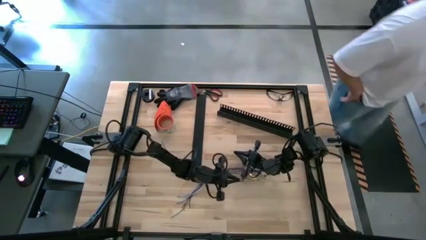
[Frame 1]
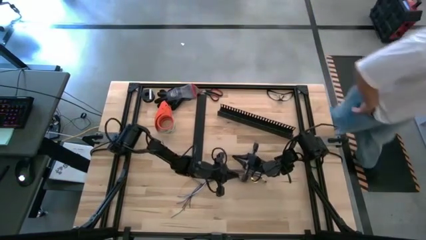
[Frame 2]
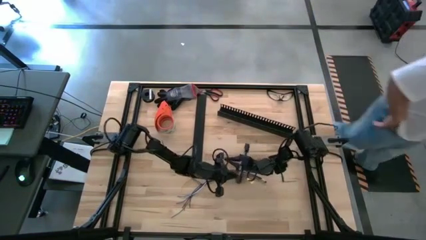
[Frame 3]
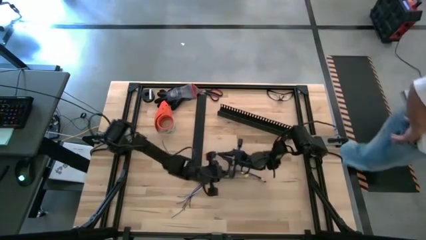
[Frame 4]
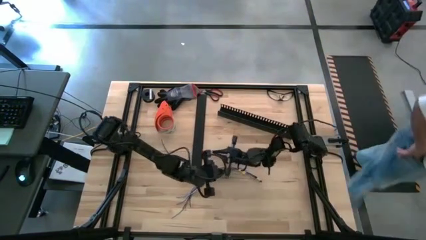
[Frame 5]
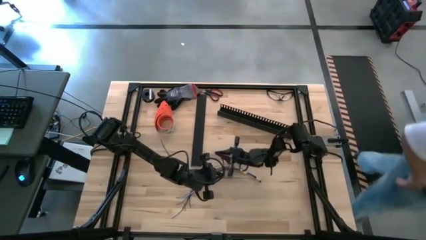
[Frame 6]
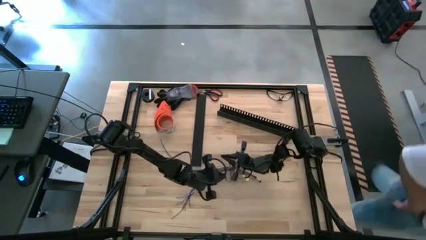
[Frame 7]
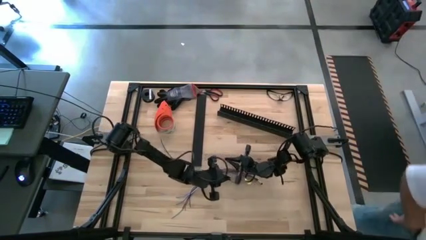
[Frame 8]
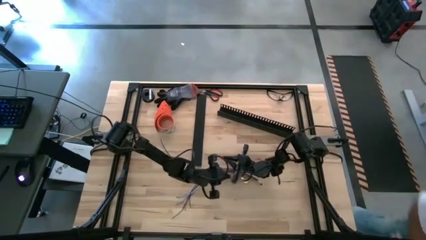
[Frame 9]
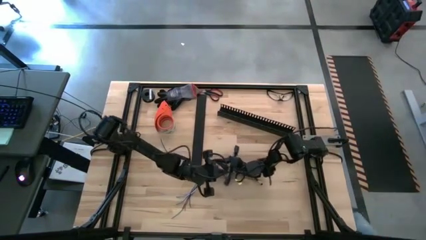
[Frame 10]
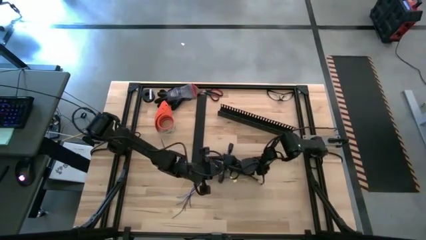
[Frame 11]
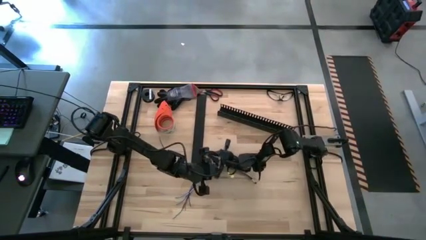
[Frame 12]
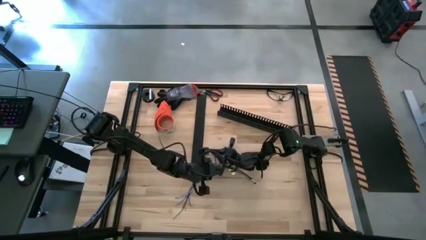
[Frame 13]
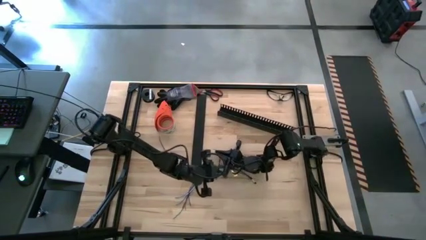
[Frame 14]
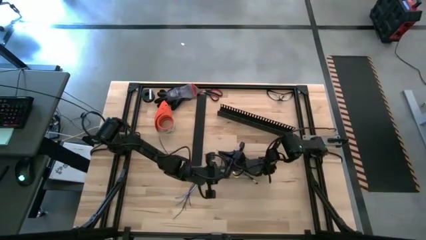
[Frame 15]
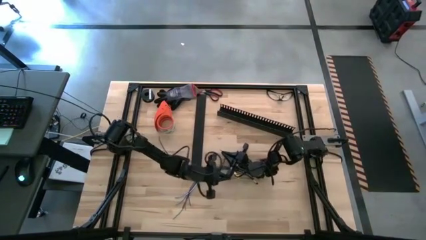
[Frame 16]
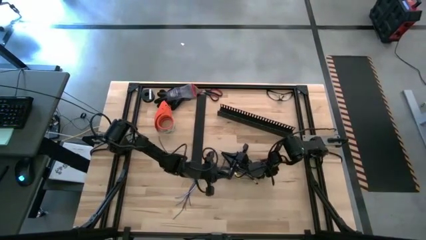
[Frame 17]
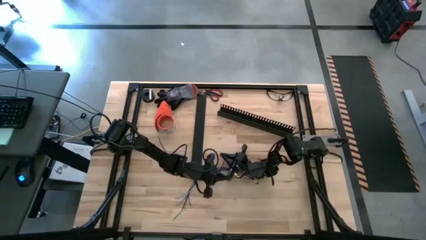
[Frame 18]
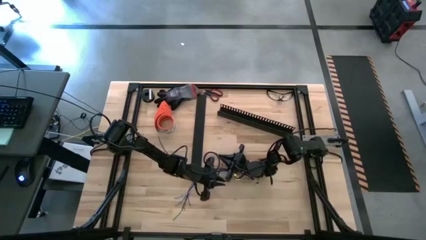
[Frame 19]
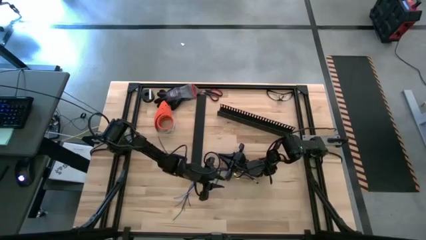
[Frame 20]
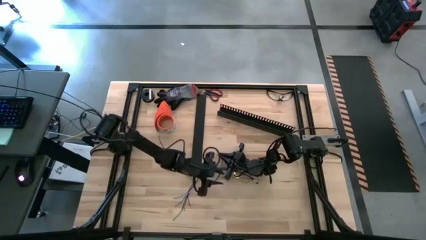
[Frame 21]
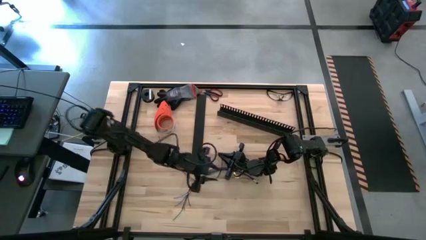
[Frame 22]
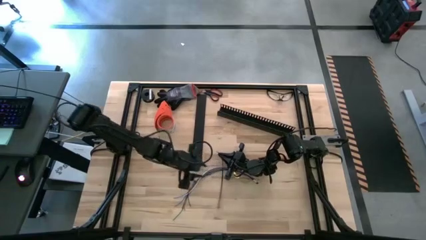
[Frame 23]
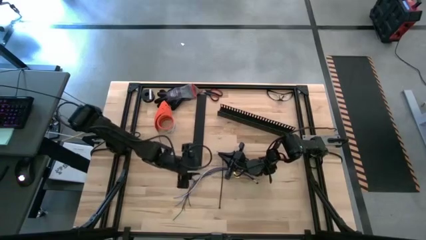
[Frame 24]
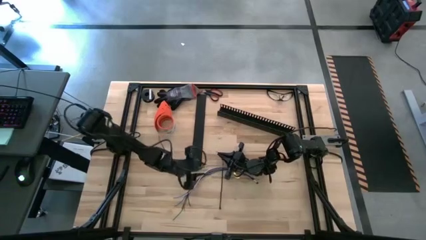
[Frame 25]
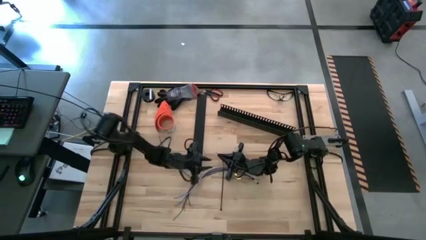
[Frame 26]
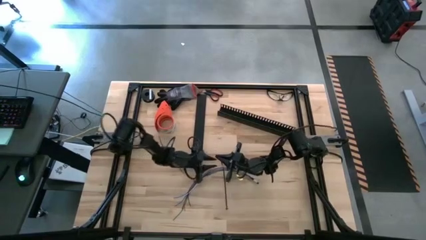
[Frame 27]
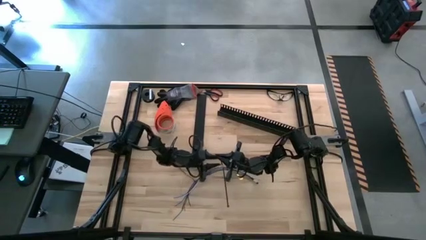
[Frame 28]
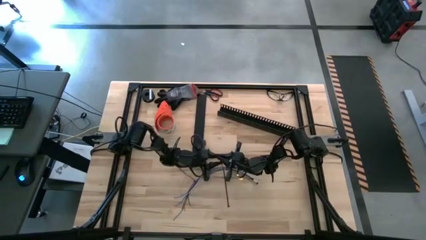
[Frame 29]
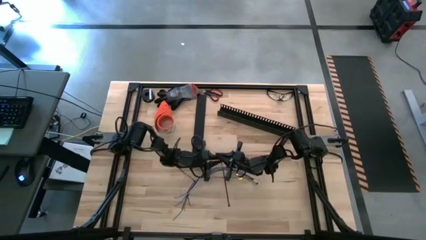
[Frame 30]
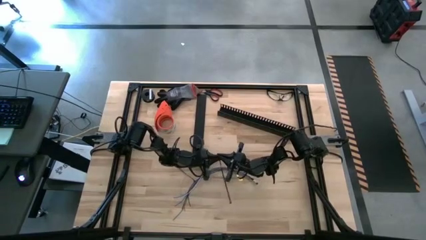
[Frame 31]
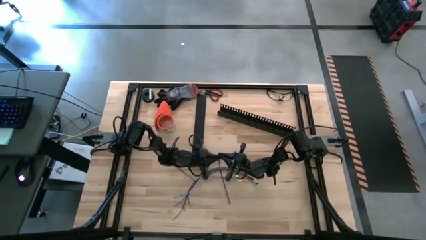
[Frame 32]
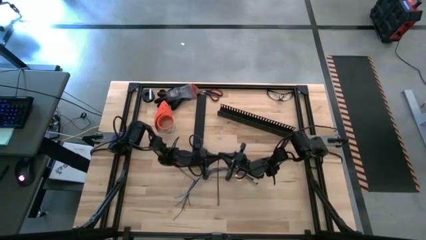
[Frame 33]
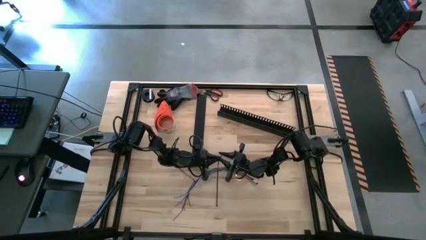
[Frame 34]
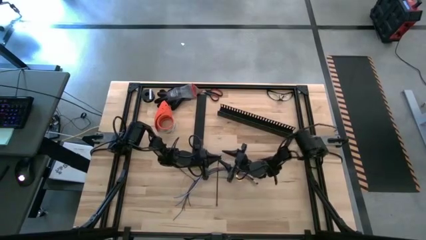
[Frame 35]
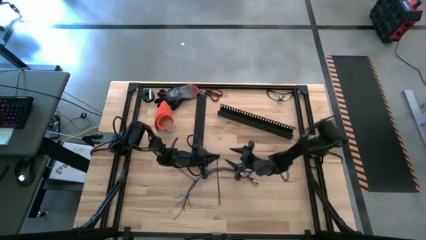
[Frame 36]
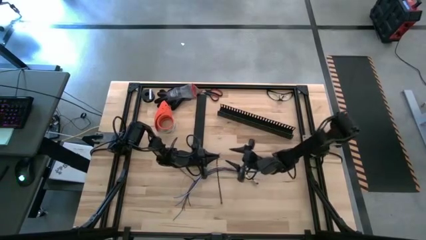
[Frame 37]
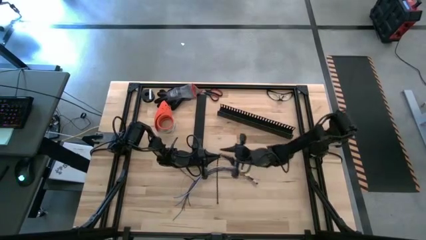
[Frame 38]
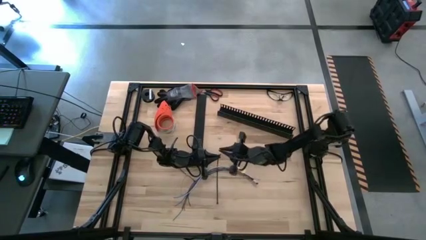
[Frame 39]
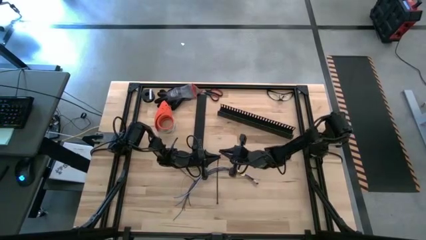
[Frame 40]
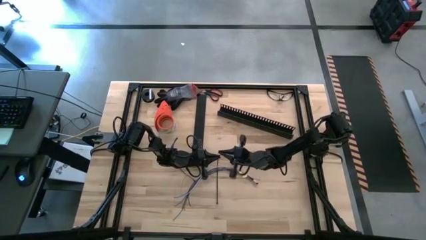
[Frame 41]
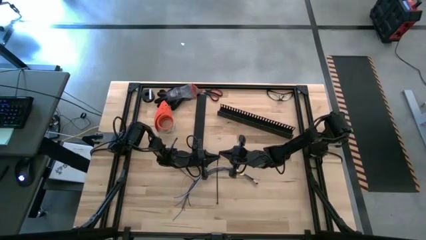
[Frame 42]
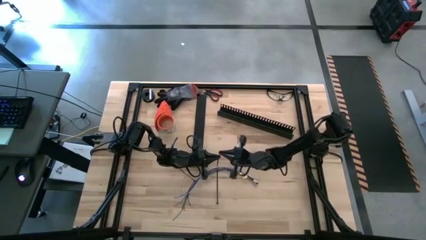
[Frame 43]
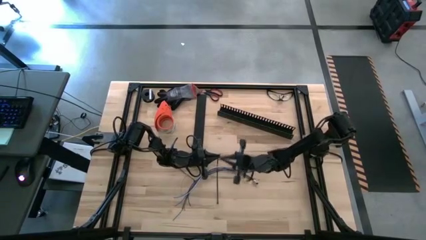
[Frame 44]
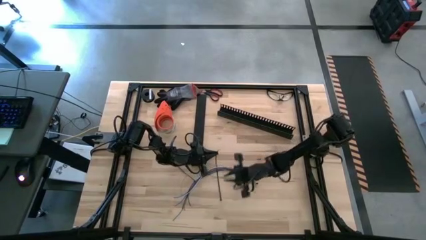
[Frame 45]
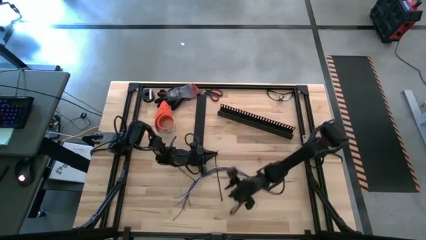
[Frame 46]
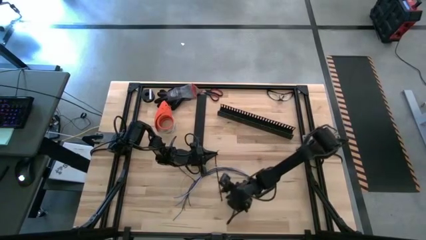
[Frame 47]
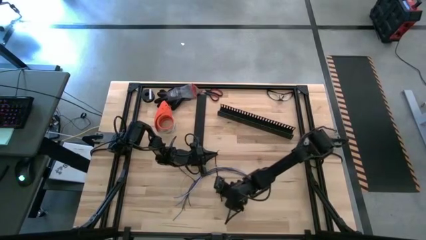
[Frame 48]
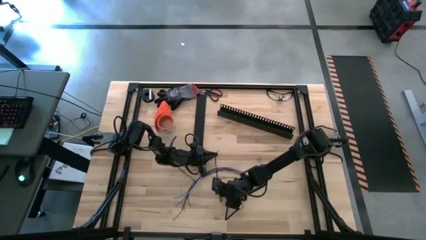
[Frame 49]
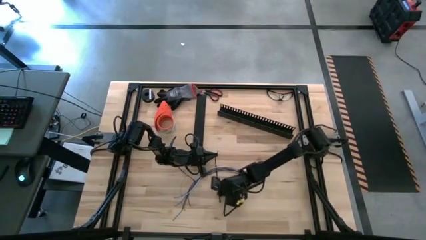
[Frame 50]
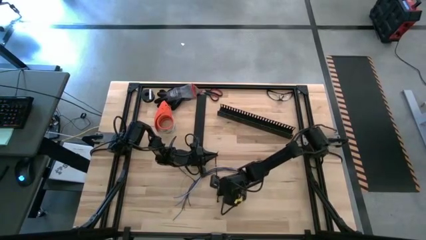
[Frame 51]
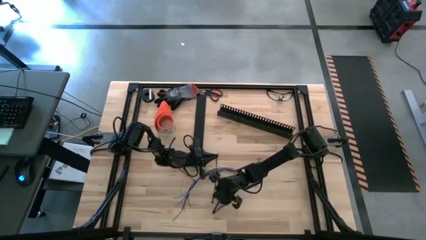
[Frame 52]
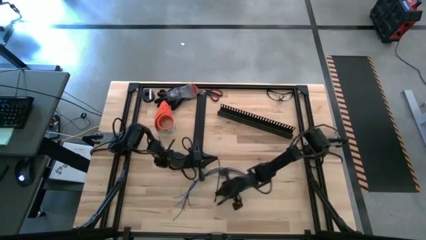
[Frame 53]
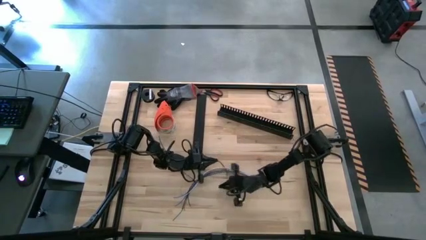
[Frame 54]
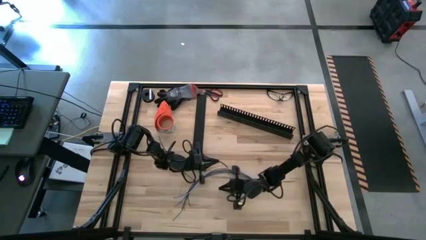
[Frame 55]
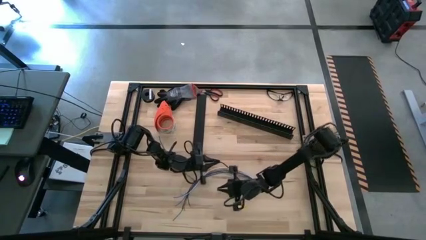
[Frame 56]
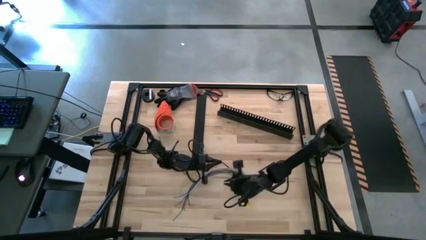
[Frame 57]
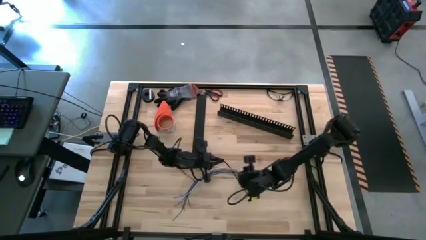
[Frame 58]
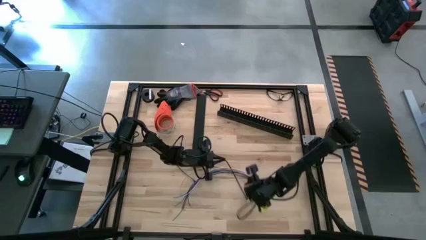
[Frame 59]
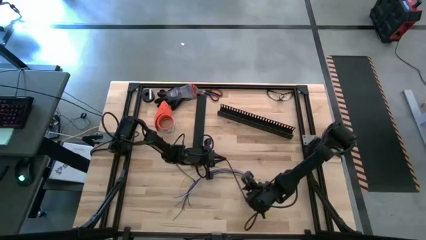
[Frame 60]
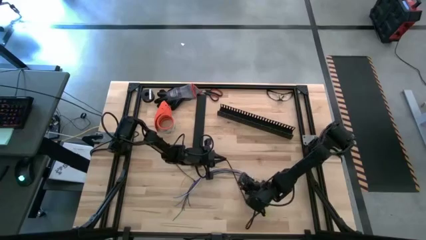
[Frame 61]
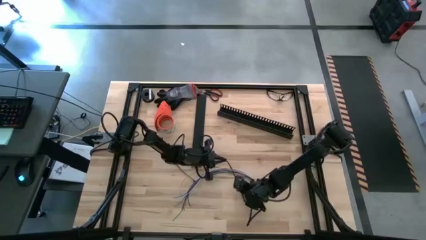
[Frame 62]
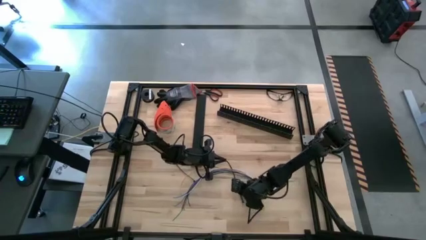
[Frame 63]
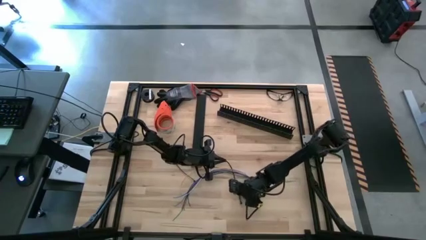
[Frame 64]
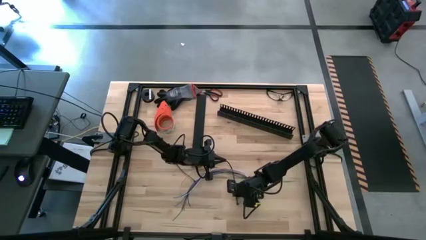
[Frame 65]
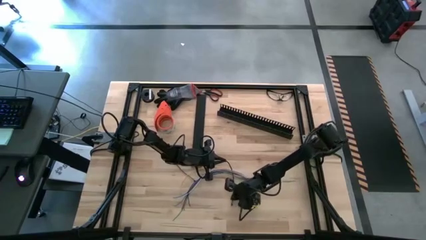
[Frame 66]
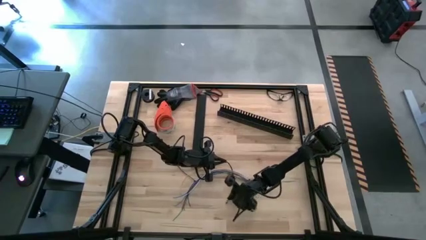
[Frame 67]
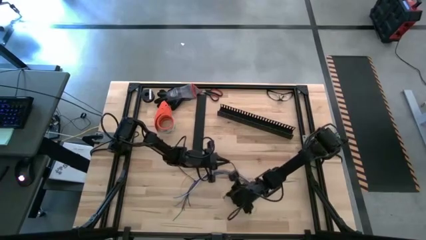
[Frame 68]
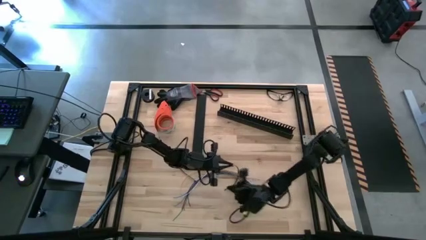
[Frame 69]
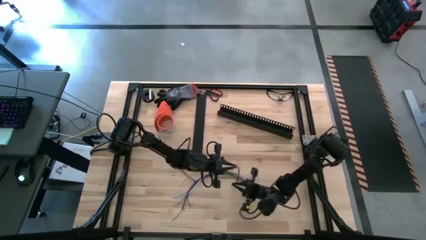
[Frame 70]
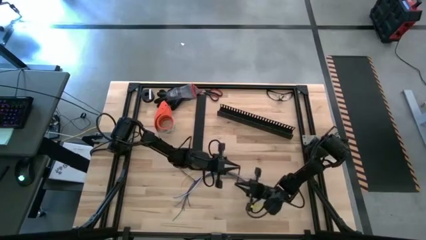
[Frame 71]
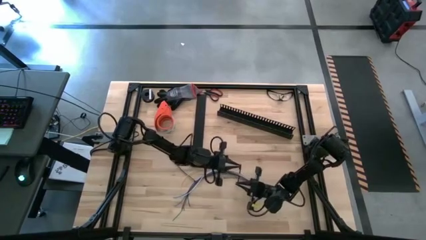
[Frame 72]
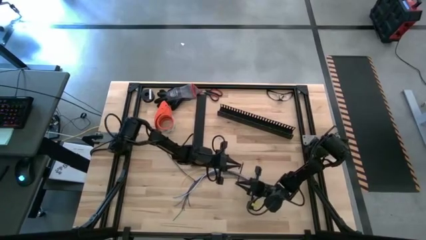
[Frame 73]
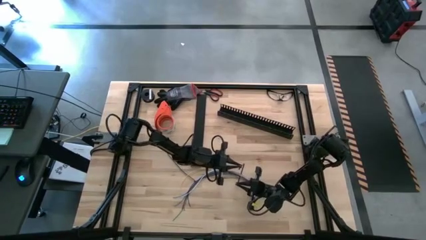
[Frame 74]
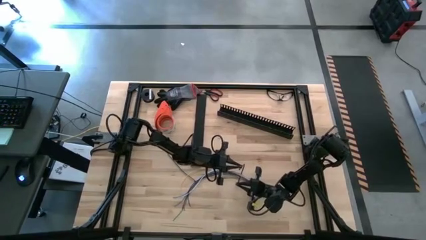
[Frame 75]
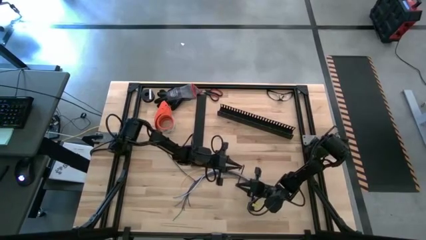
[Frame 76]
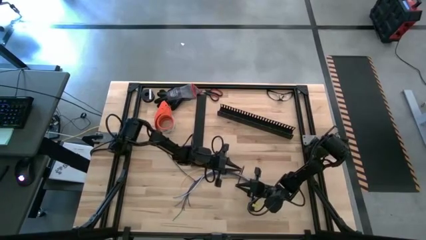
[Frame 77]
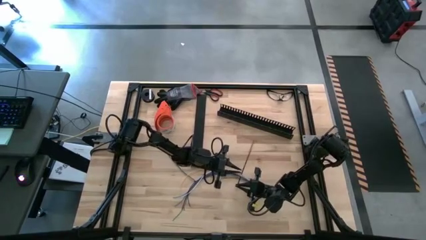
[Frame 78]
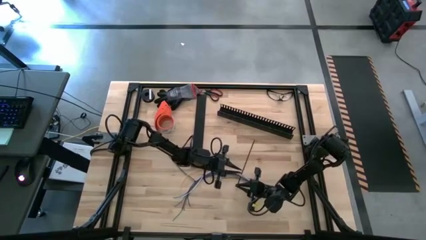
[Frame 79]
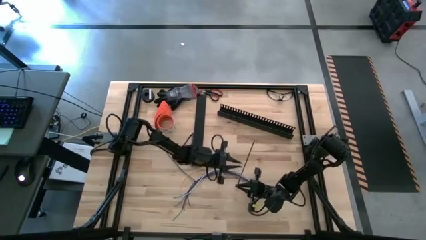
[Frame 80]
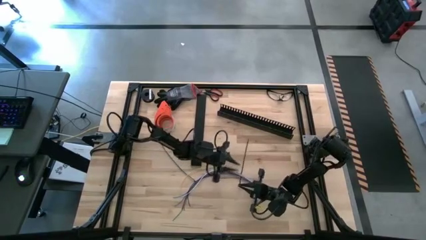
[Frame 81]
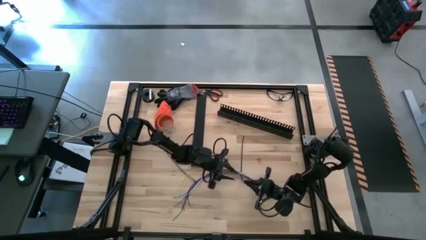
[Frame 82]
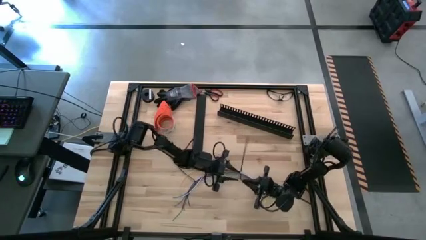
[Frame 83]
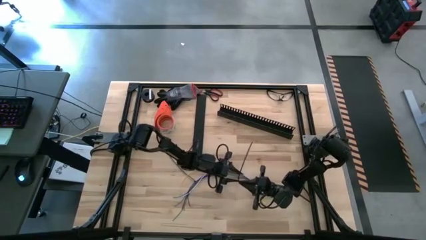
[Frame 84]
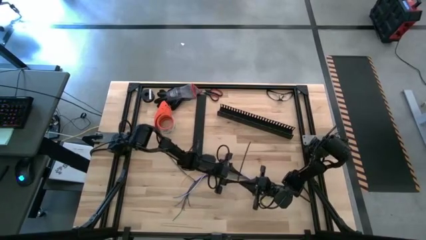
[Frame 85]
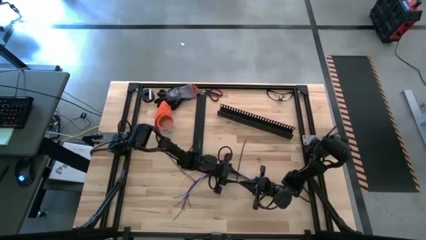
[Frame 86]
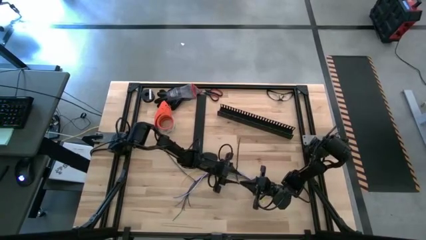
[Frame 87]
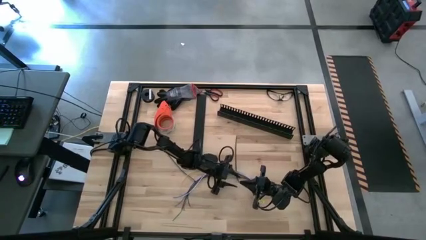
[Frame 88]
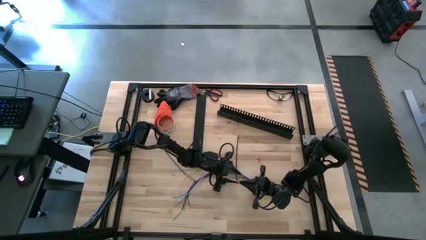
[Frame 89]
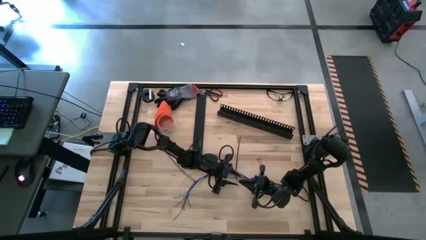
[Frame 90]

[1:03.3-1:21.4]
Task: Ziptie cables
Wrap the black zip tie on the cables
